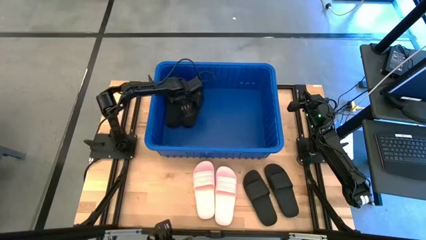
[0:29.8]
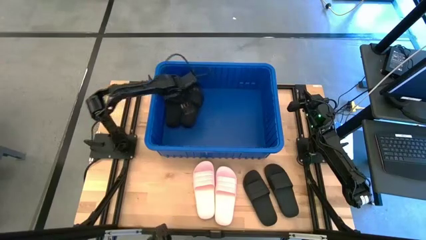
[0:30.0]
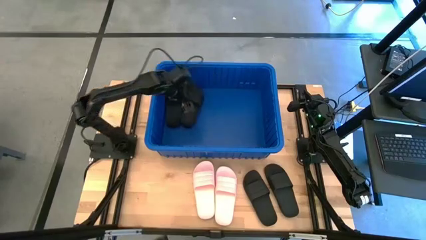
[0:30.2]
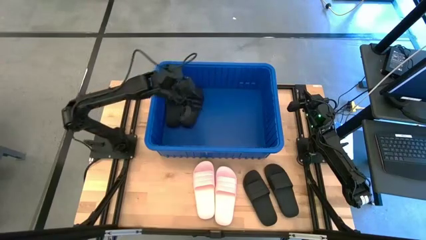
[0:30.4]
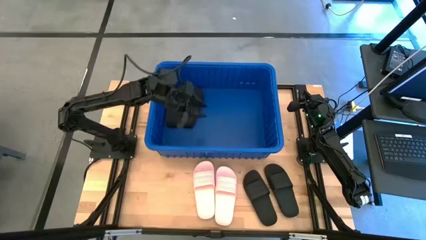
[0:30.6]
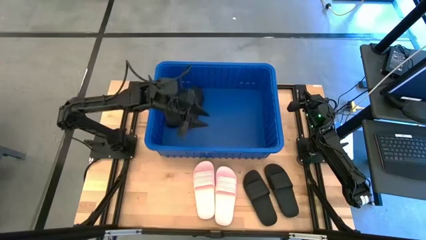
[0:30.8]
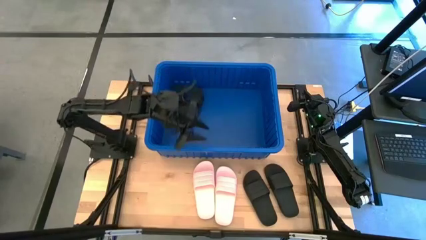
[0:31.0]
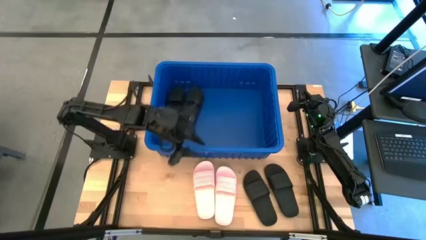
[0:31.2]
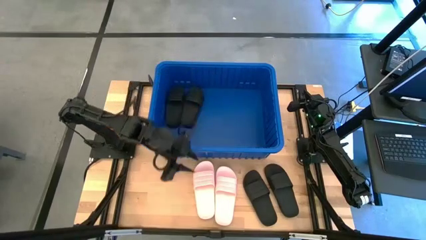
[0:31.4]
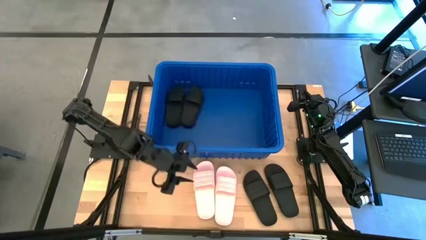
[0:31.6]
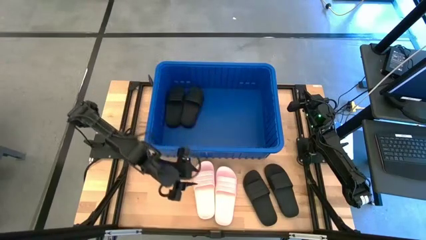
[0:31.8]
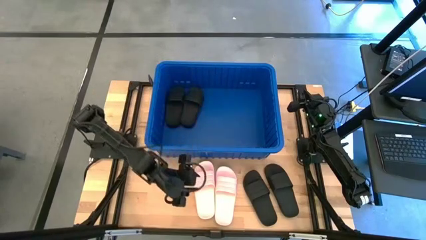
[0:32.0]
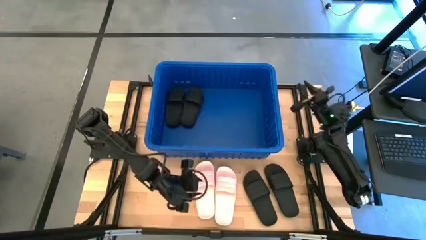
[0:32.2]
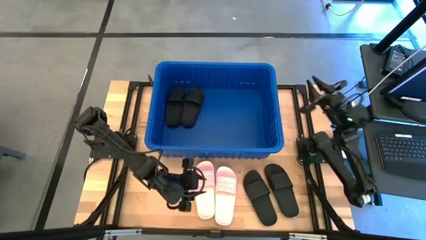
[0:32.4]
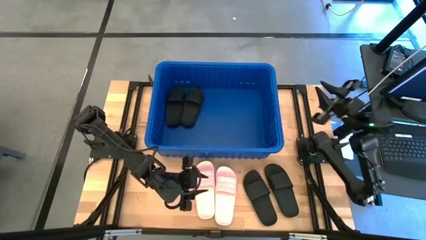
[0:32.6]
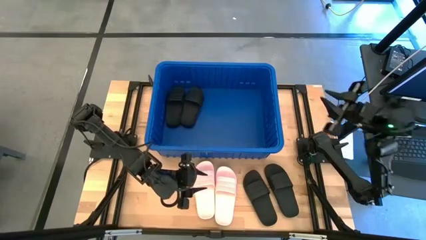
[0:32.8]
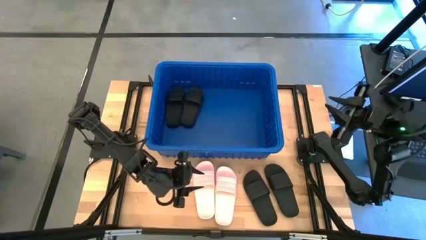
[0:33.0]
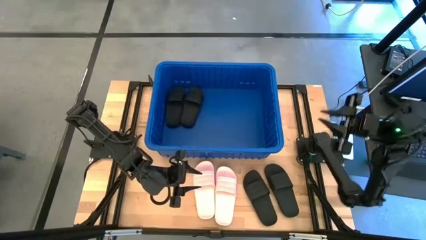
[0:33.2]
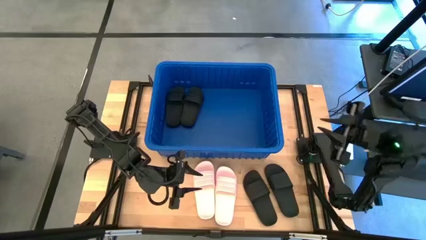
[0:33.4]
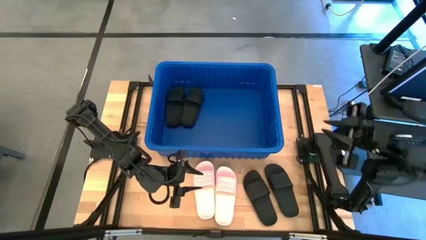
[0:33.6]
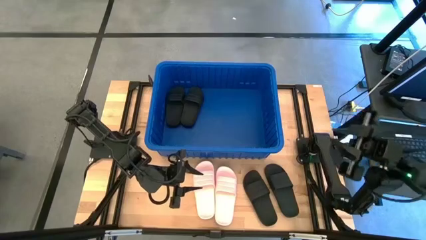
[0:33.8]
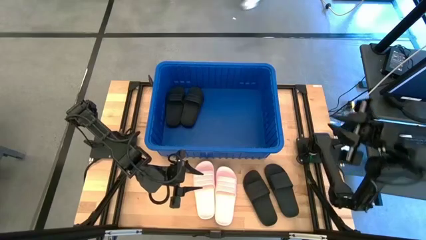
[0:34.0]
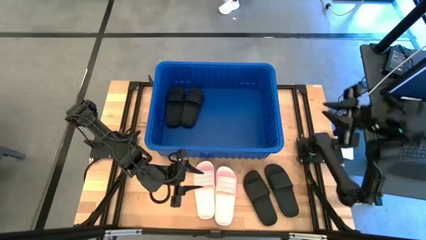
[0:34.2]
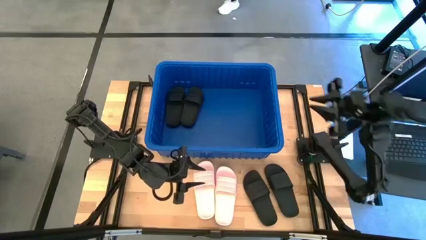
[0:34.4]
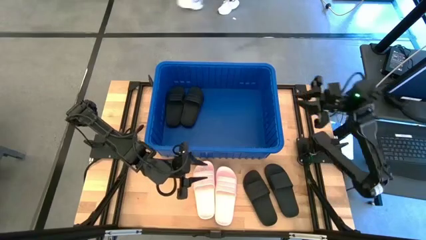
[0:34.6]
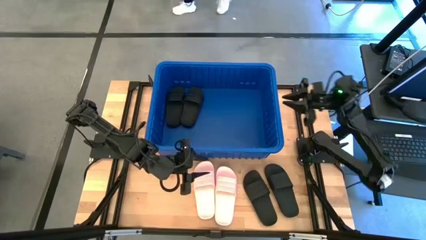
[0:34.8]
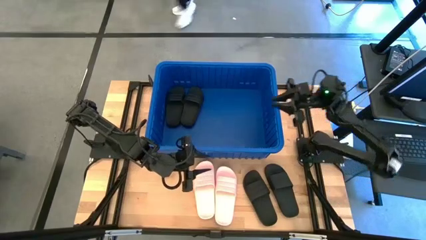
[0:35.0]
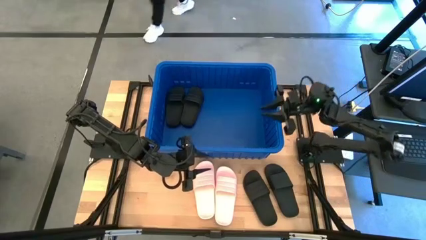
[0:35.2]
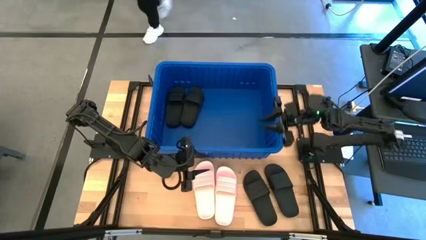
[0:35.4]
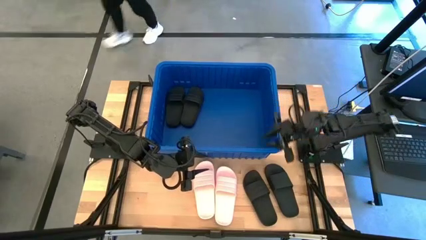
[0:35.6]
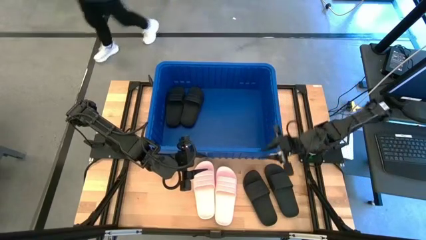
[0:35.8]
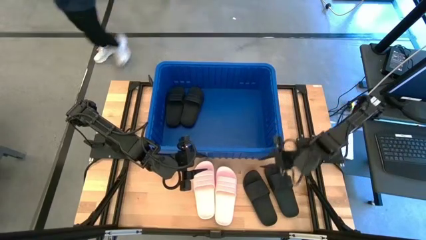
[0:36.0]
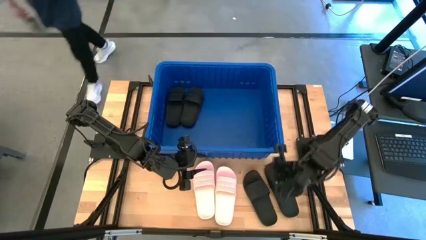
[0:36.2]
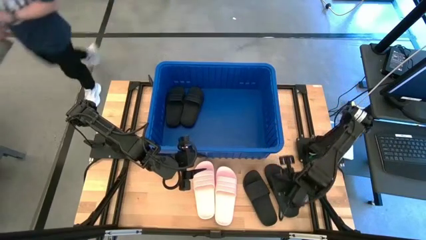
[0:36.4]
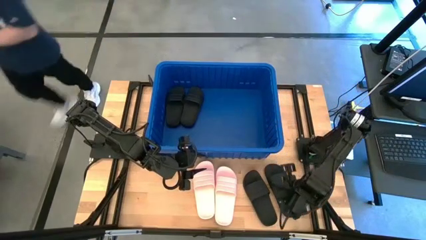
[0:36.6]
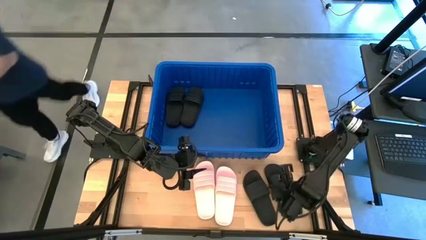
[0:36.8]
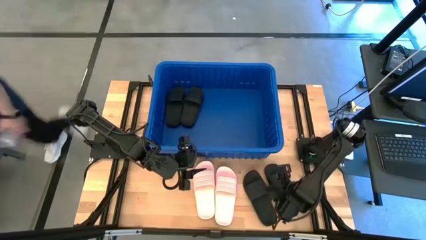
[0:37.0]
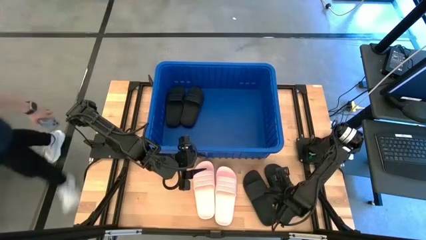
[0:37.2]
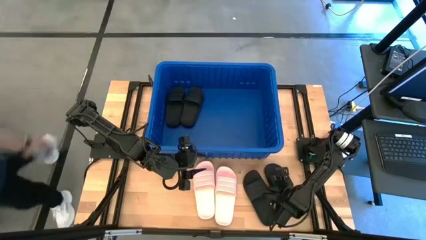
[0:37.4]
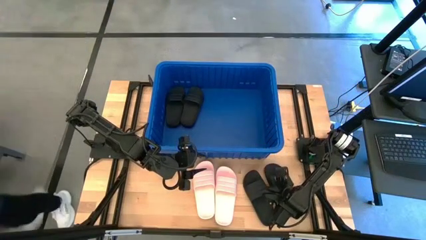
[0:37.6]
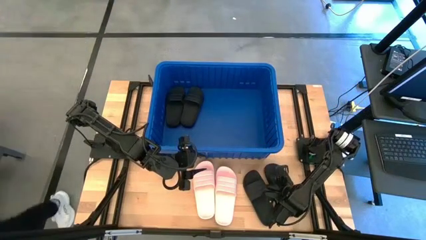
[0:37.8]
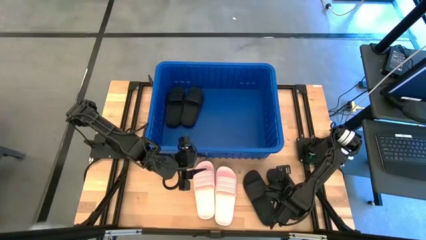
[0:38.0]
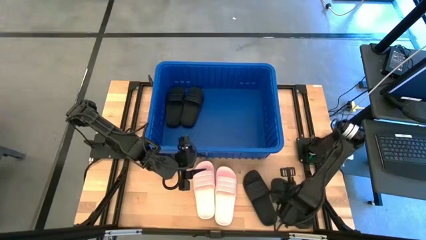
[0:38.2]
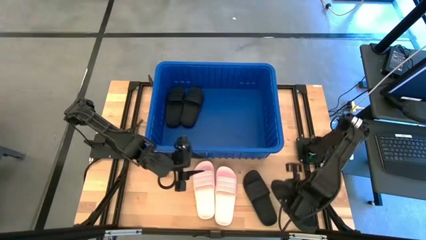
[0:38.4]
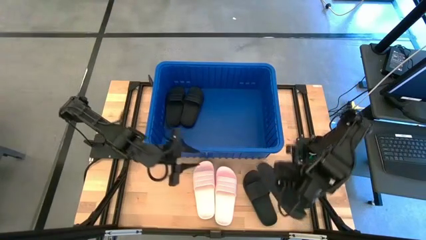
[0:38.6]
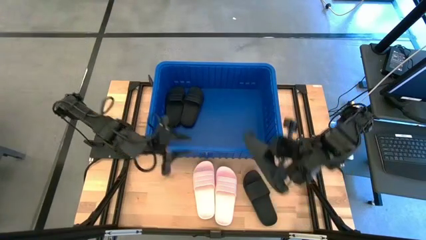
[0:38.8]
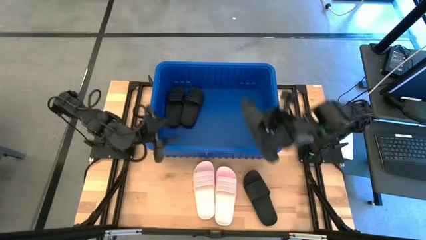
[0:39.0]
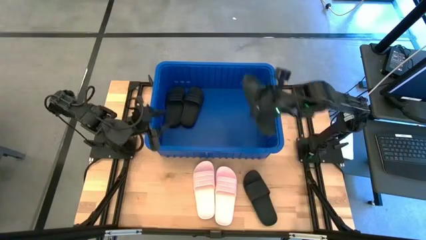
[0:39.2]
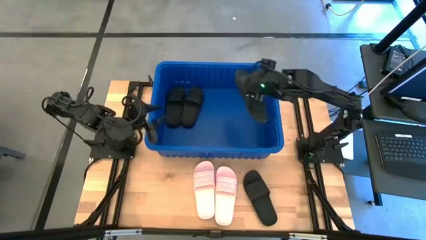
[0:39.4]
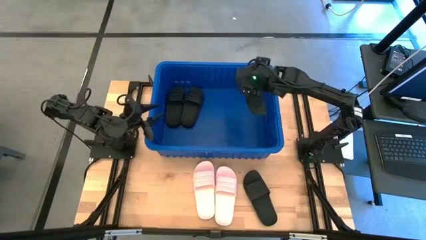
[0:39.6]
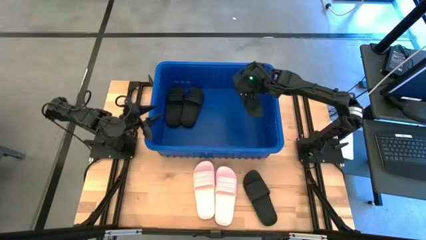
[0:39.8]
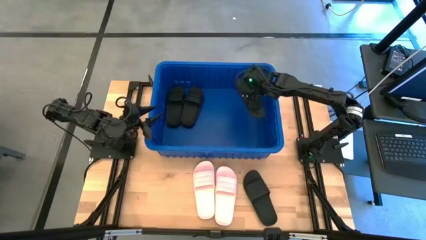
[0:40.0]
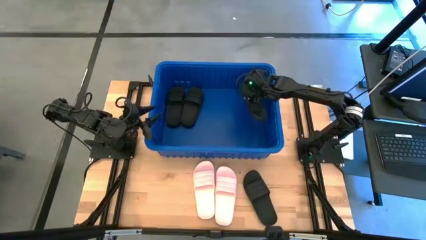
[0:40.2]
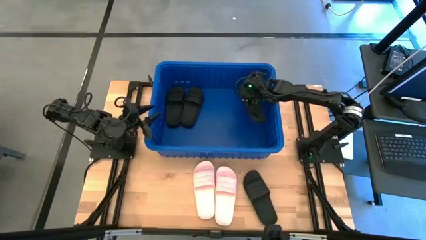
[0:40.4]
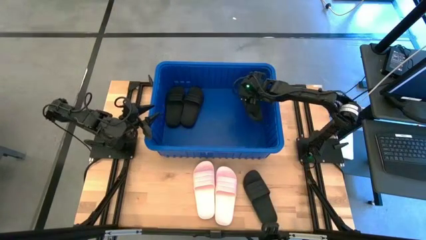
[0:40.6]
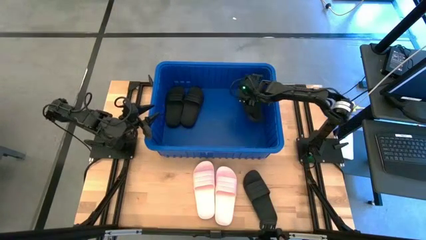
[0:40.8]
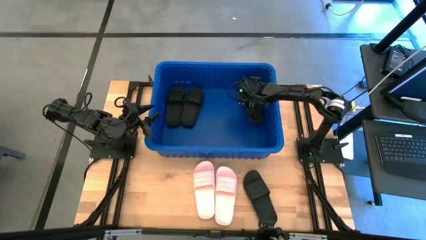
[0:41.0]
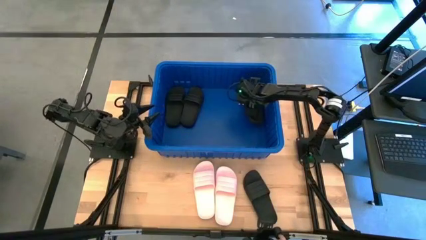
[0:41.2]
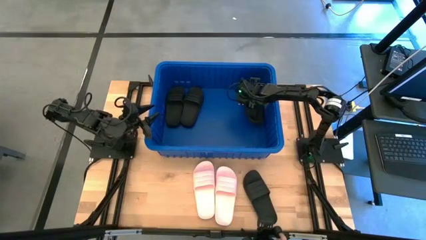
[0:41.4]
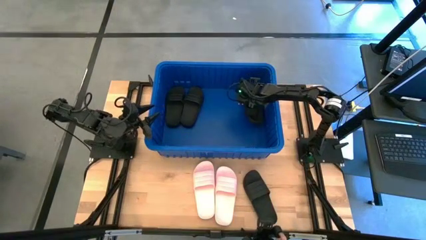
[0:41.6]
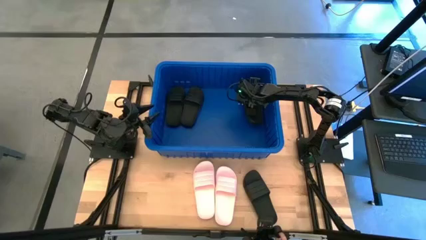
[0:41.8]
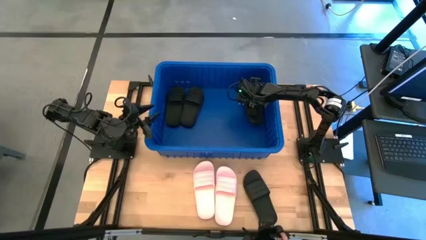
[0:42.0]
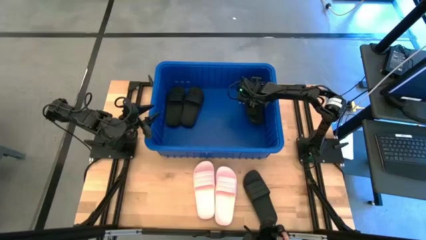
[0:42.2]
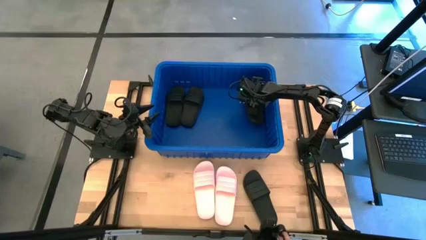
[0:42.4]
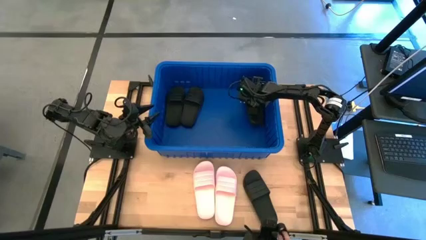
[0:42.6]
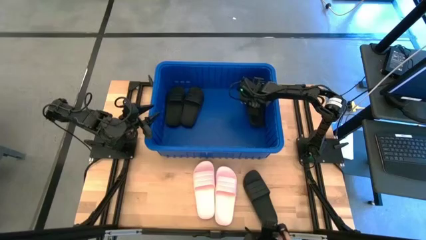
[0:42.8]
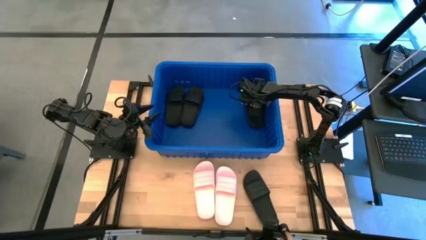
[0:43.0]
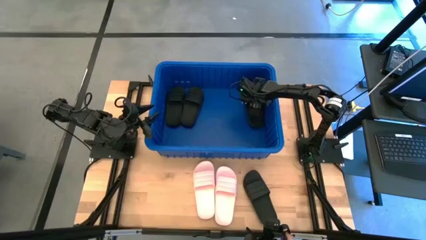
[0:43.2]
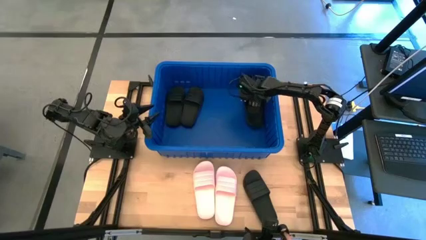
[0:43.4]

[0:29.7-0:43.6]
Task: Pick and place slides into bin
Put the black slide into the blue bin
